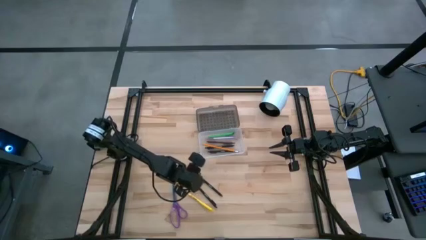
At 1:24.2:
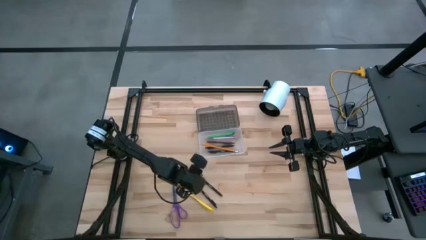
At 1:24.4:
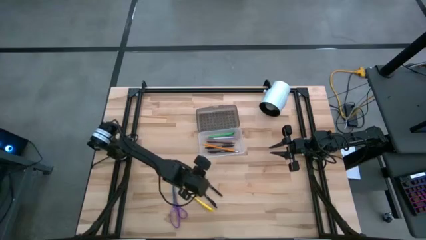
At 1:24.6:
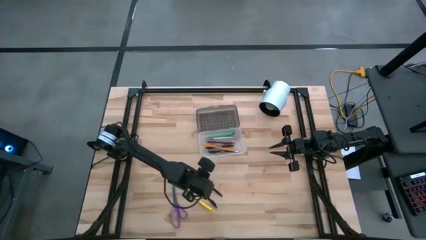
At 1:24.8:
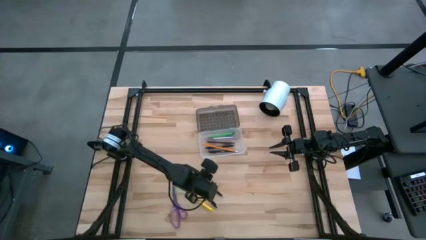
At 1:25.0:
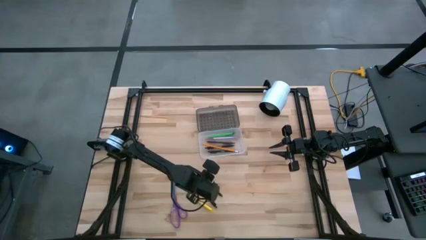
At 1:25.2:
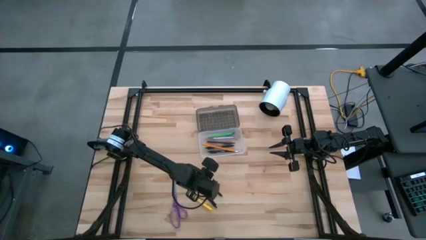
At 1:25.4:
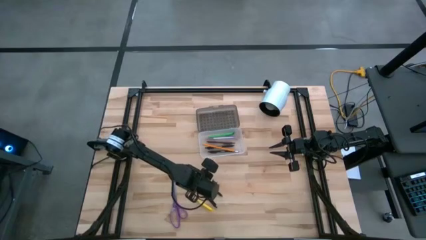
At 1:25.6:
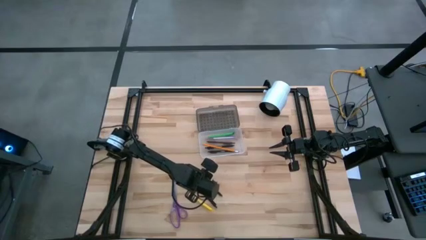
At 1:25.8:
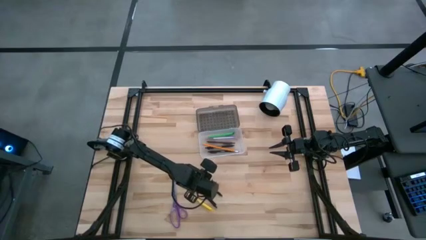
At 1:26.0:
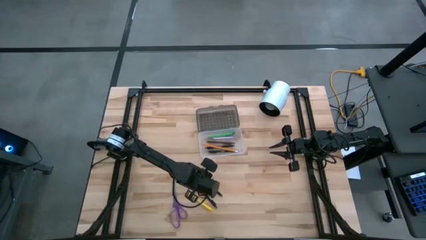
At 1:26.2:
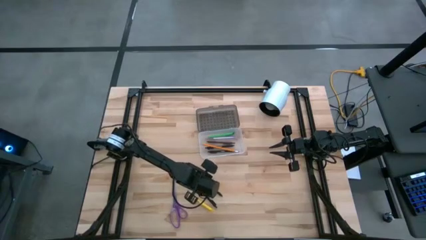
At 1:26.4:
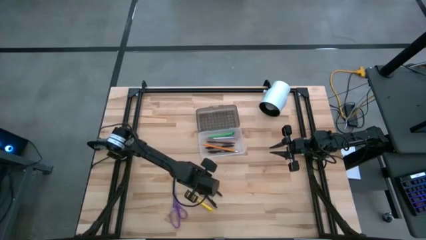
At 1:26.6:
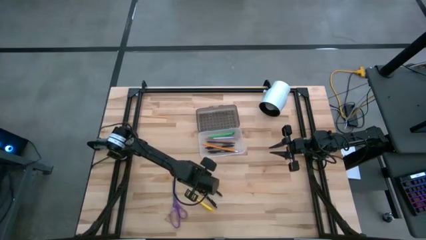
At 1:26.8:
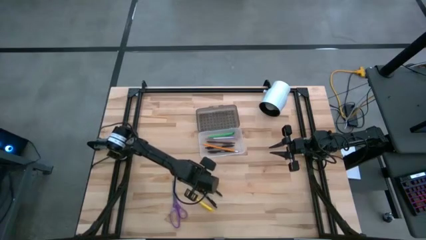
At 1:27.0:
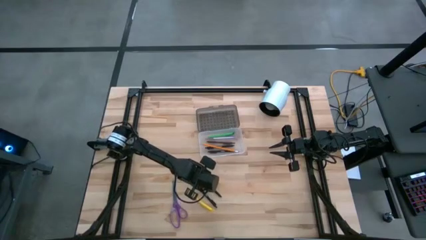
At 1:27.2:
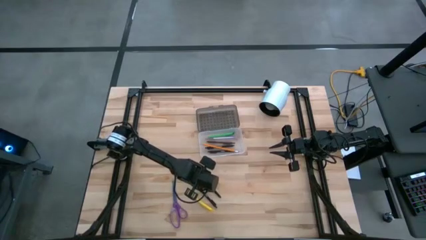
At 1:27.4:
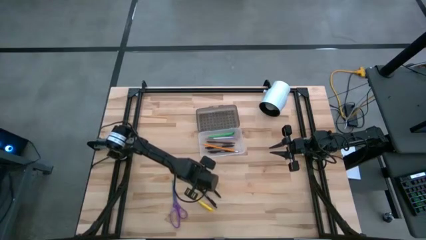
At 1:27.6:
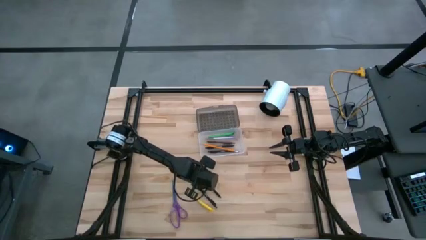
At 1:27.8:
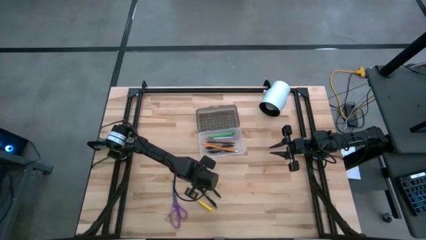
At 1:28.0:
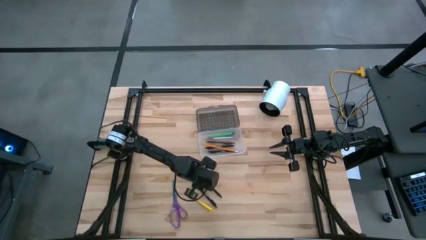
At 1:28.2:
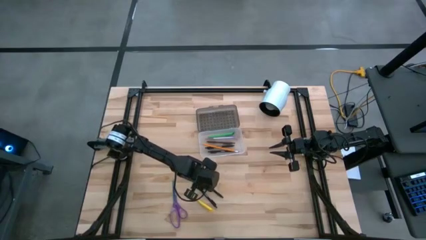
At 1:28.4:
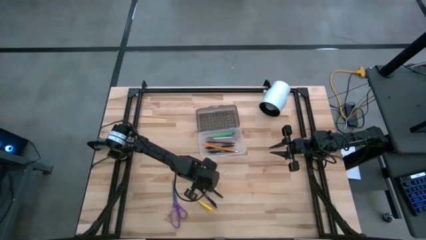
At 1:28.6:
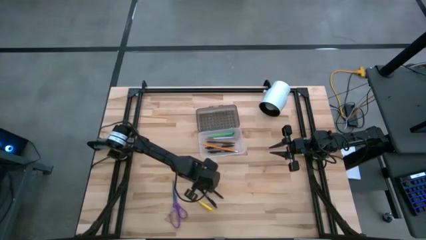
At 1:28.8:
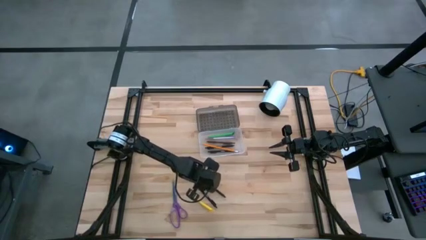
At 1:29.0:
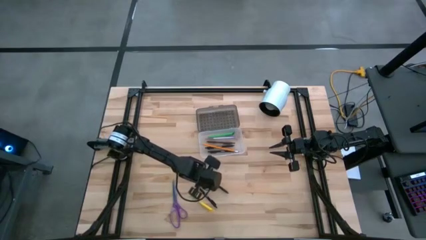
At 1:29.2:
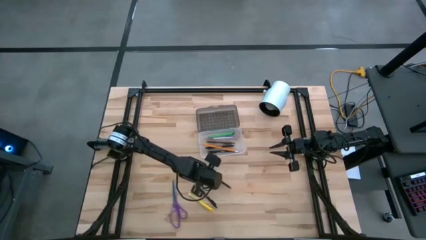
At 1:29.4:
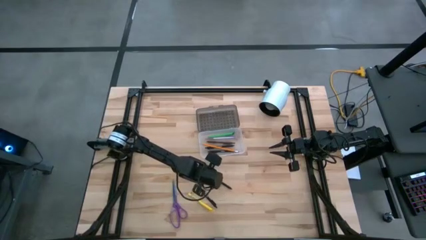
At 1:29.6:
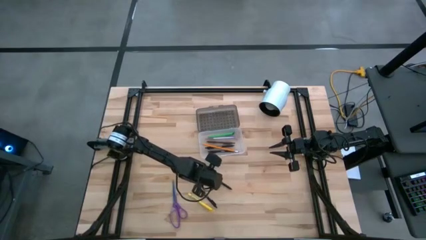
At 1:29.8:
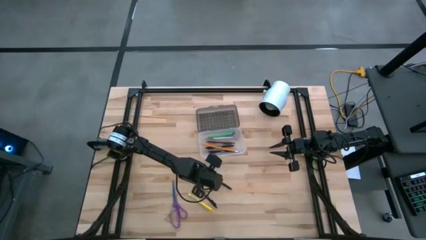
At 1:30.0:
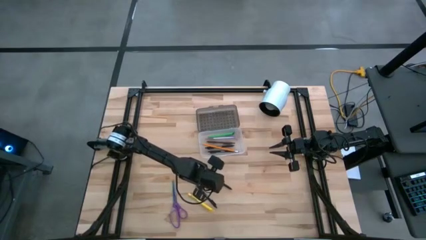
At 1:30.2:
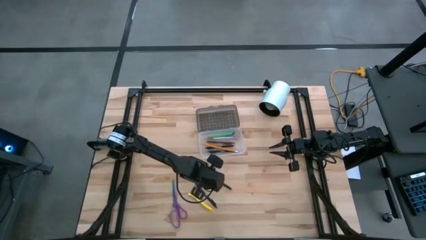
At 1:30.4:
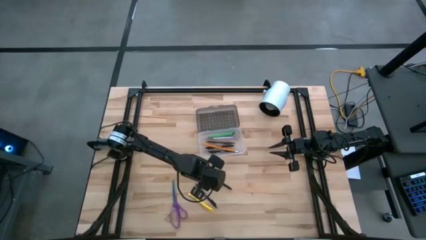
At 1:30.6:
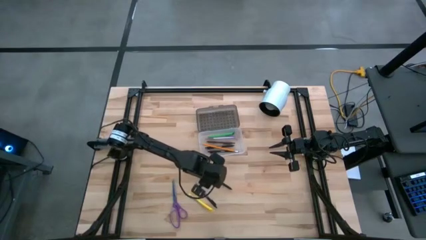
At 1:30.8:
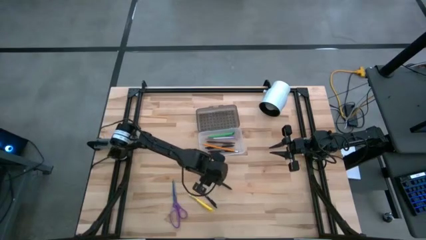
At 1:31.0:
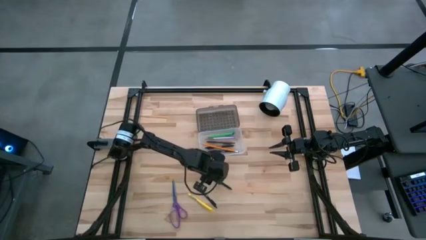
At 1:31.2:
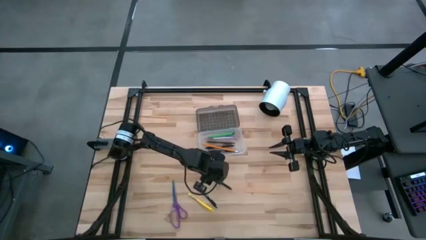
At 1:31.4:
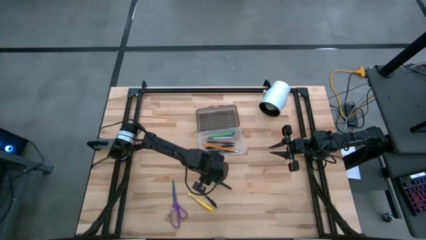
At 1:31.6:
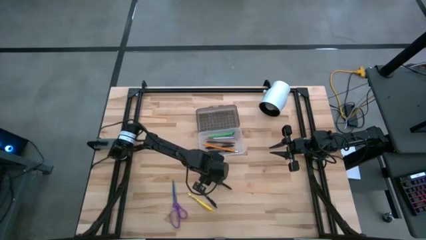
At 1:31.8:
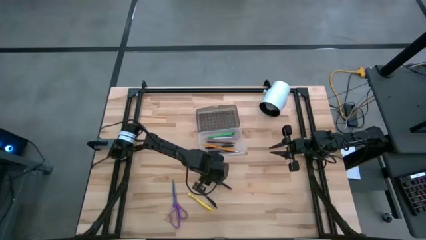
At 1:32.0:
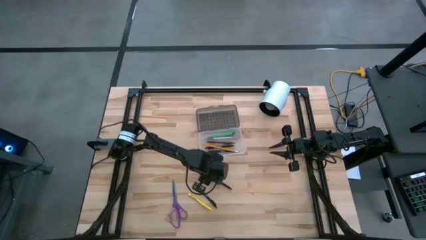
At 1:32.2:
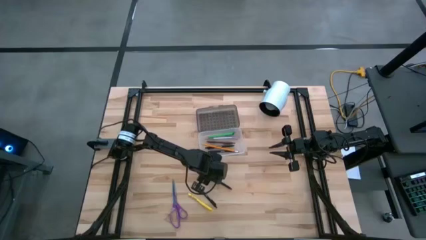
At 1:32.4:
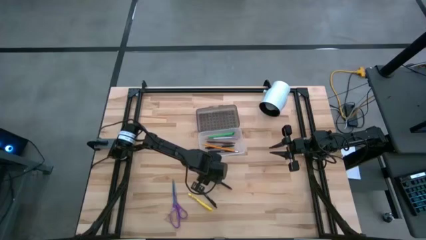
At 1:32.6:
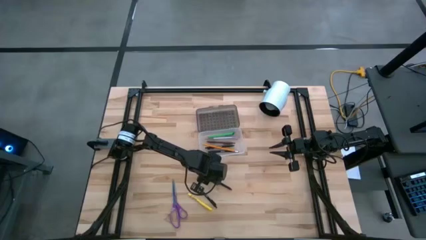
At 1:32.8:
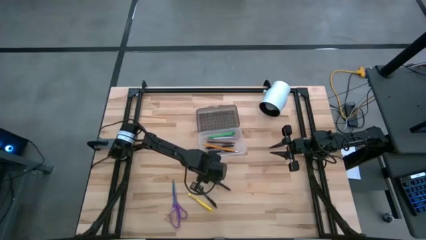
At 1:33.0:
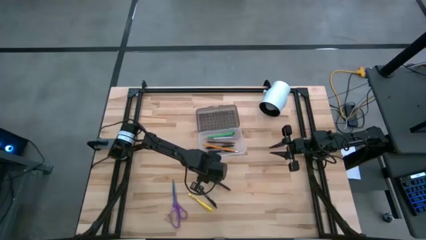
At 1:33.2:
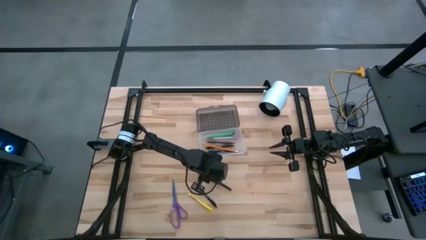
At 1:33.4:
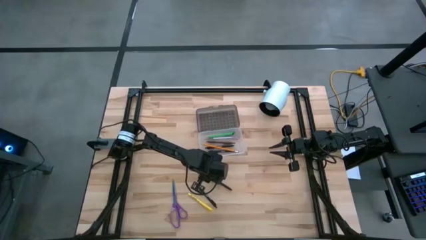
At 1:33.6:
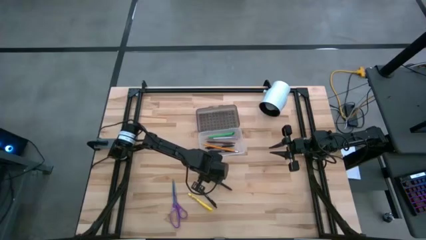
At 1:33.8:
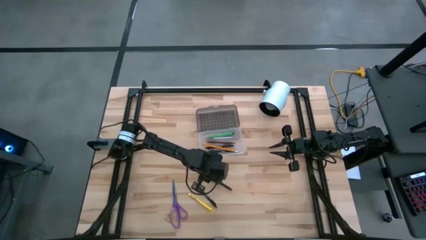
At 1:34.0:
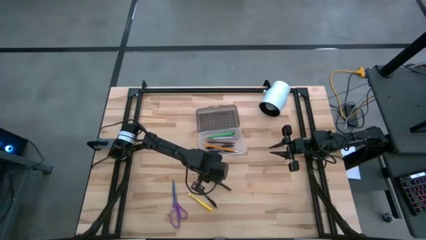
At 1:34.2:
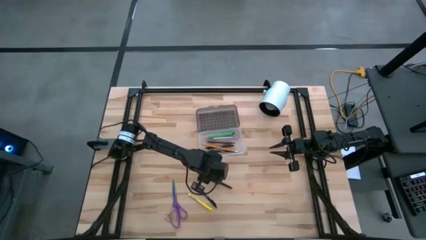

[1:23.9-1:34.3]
Task: Pick & place school supplies into a supply box
Put the black pen into the transparent supply box

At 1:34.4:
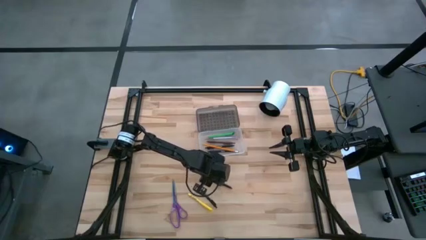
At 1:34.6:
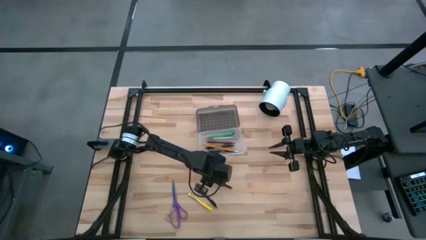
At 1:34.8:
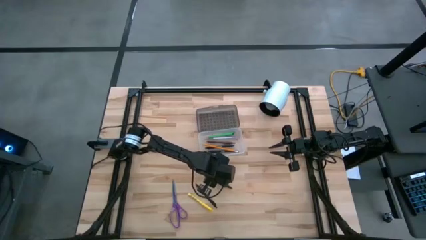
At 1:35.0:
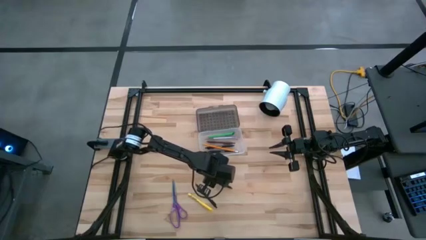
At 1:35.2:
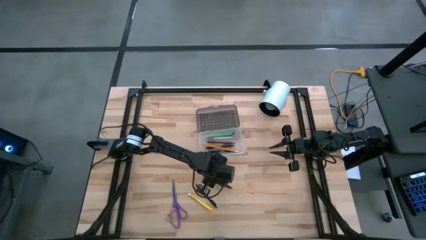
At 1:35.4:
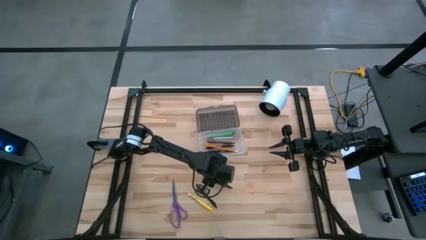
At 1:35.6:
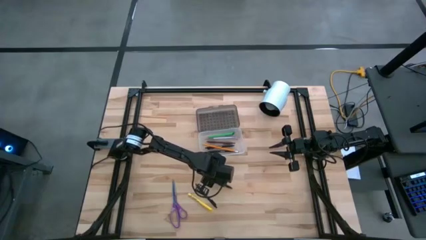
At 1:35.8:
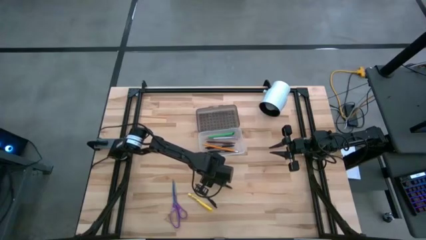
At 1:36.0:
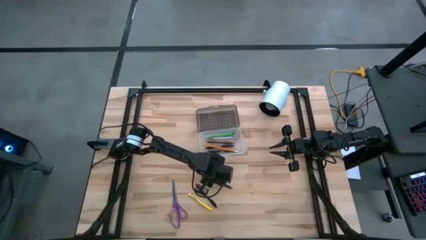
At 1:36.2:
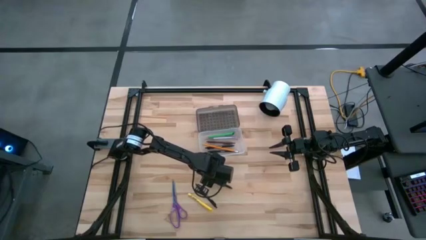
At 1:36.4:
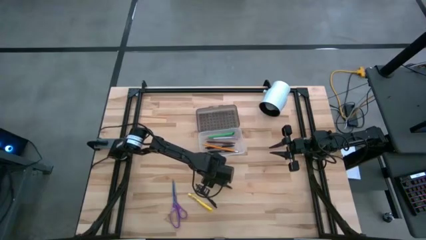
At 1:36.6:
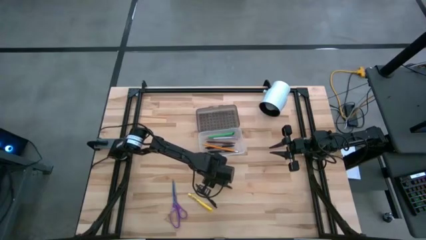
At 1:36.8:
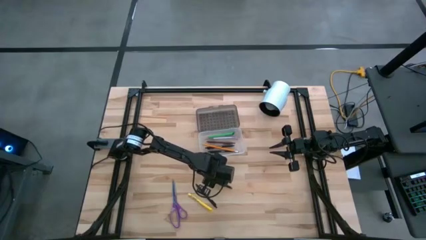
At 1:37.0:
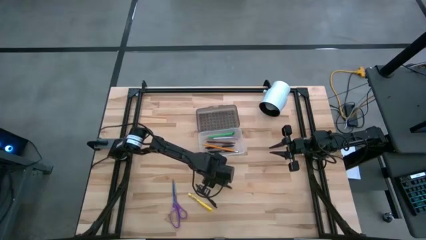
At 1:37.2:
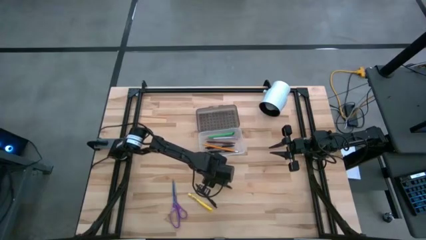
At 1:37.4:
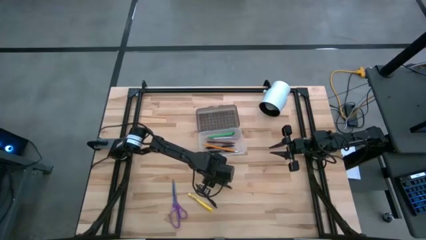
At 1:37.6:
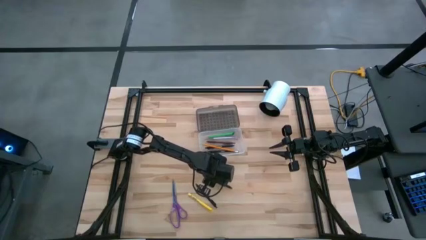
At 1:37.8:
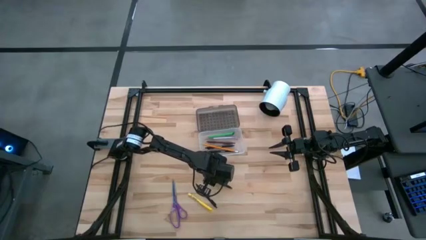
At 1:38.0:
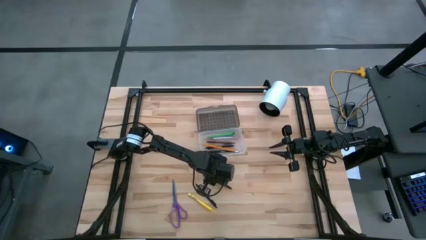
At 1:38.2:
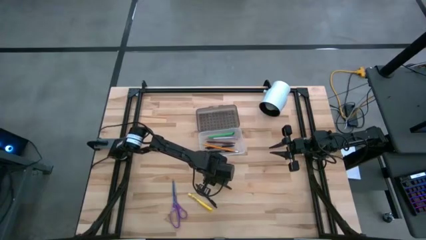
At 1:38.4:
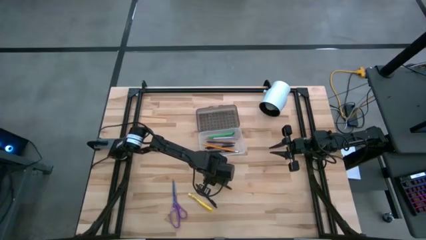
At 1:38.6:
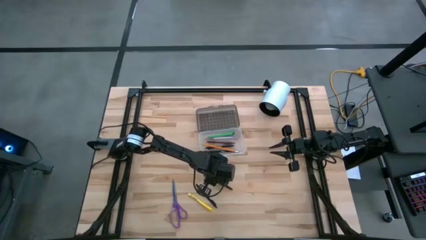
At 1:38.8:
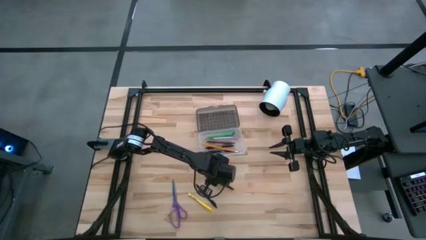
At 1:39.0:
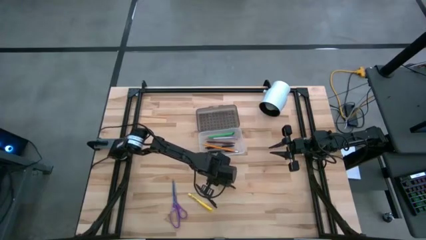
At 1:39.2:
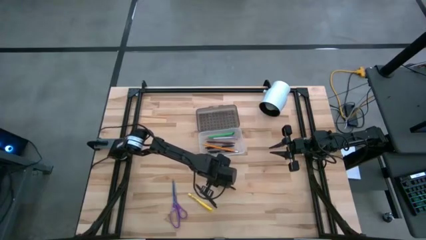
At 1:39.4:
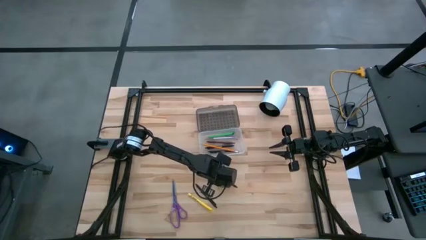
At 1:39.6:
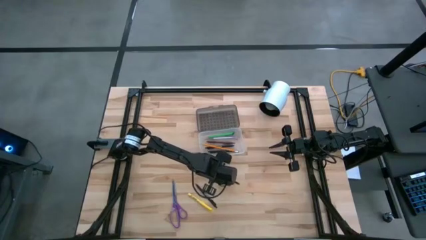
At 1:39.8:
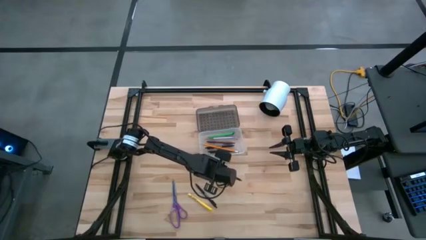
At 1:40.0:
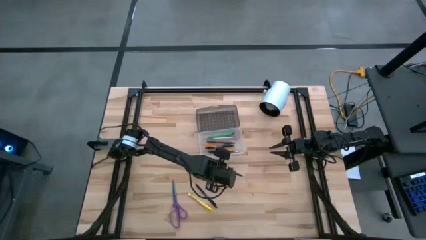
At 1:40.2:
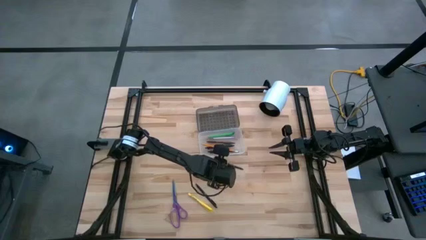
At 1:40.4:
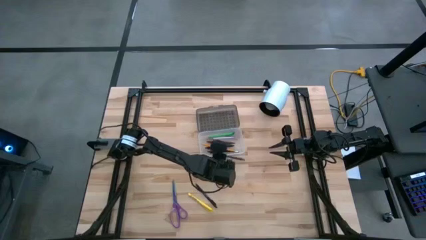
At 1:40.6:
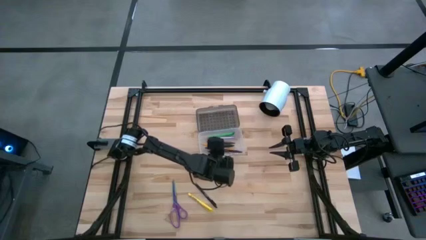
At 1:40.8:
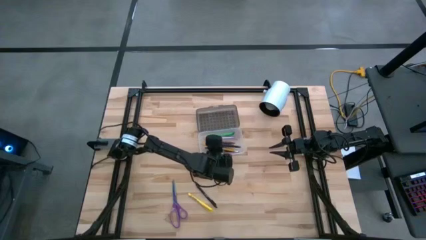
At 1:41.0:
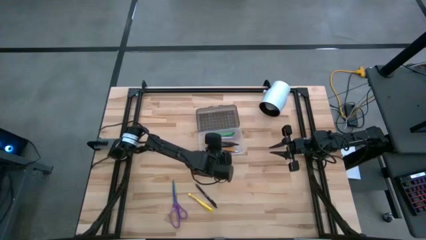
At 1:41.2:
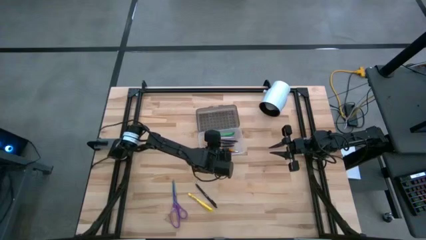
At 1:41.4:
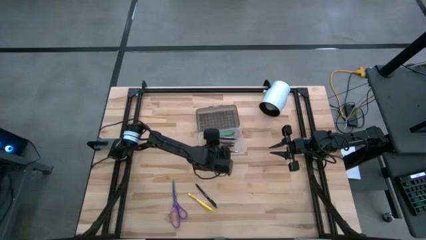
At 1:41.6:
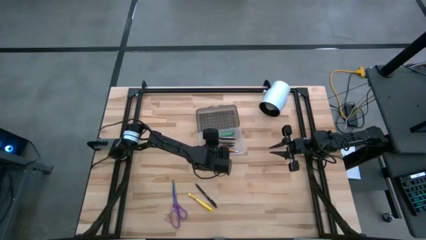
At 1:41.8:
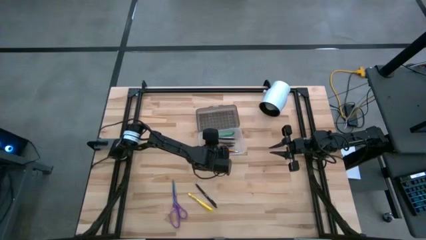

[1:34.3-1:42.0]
Put the black pen into the transparent supply box
